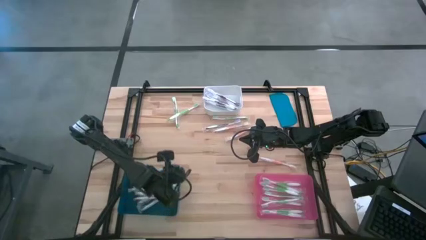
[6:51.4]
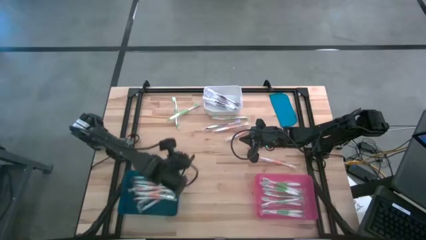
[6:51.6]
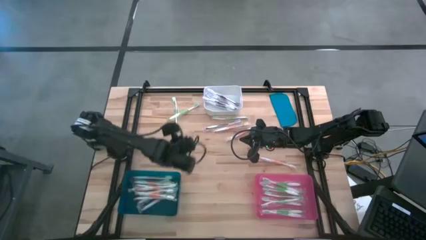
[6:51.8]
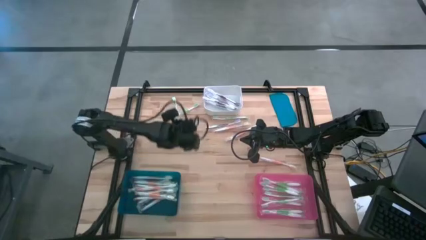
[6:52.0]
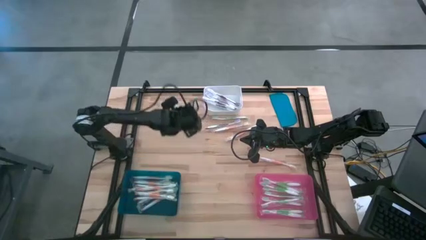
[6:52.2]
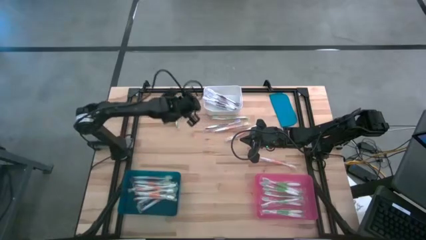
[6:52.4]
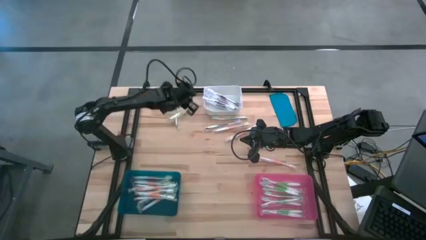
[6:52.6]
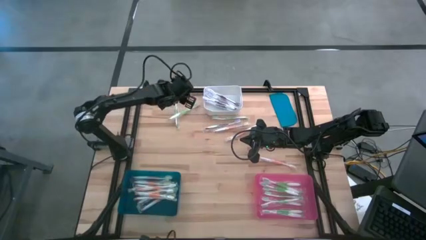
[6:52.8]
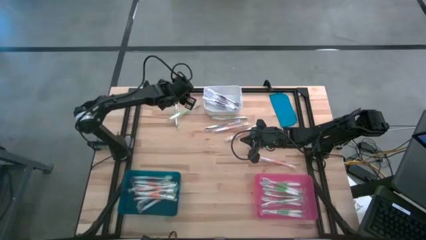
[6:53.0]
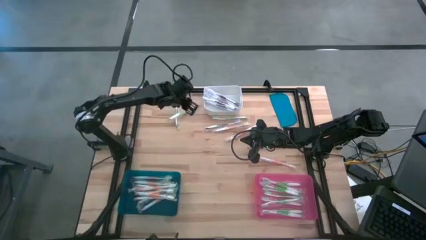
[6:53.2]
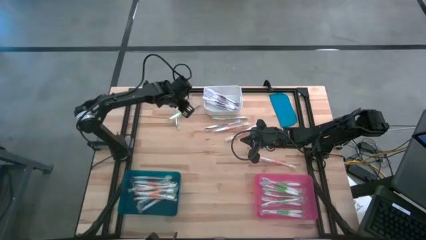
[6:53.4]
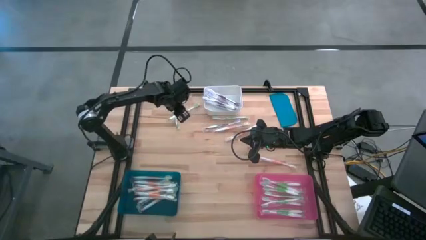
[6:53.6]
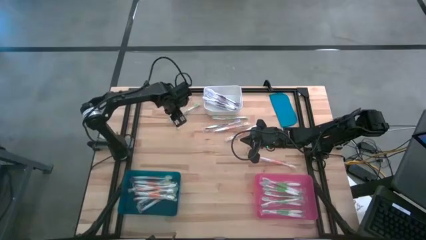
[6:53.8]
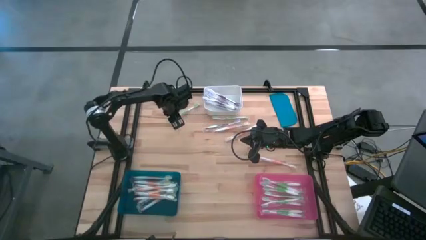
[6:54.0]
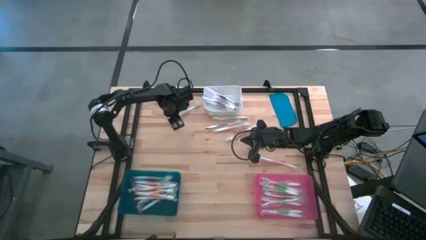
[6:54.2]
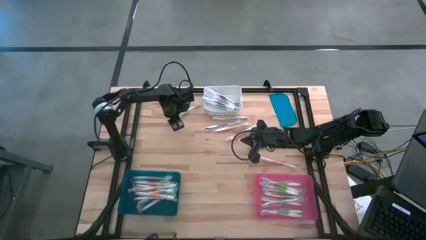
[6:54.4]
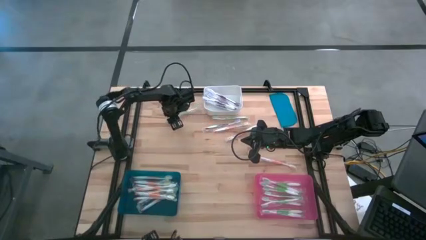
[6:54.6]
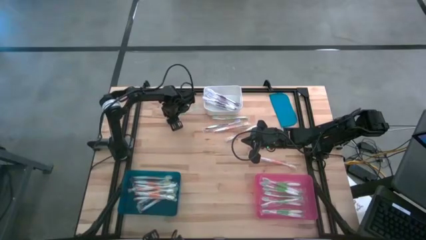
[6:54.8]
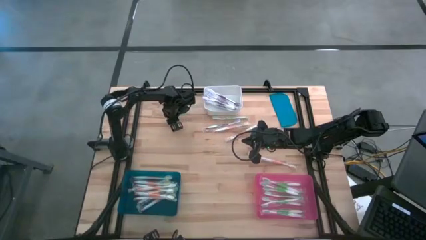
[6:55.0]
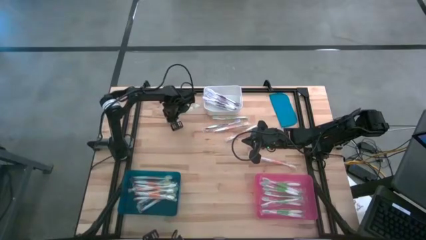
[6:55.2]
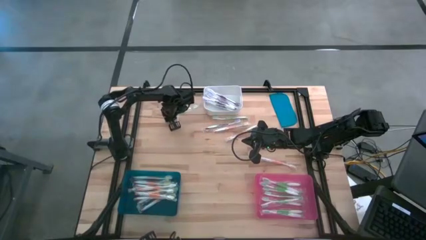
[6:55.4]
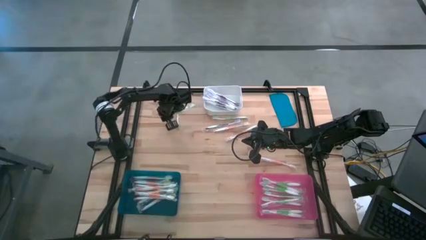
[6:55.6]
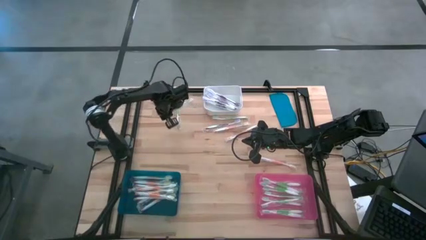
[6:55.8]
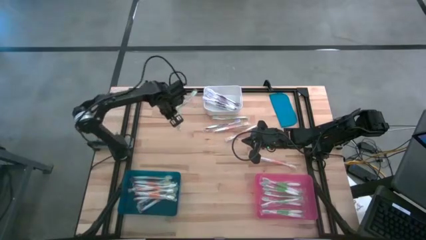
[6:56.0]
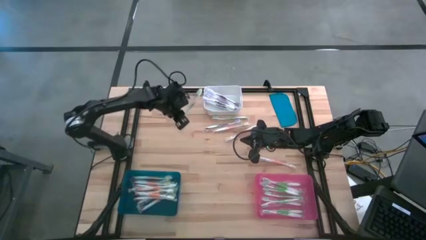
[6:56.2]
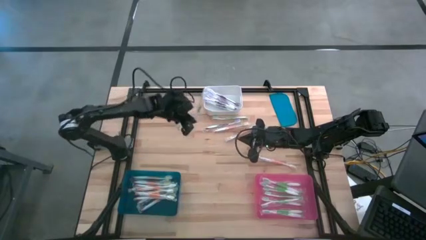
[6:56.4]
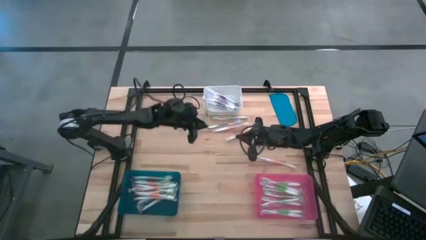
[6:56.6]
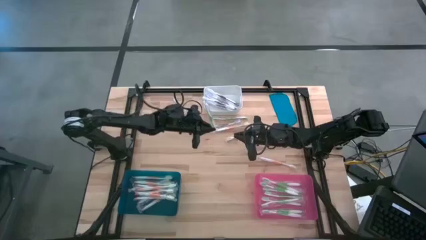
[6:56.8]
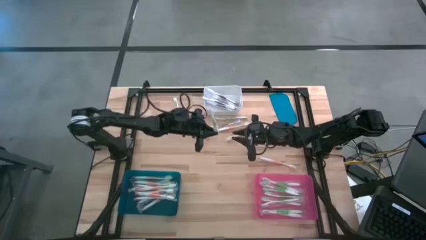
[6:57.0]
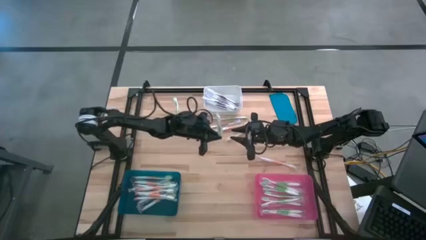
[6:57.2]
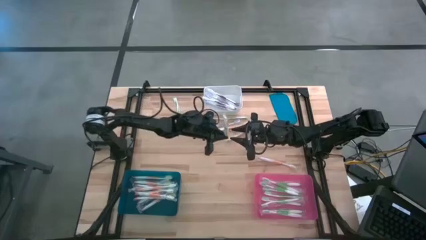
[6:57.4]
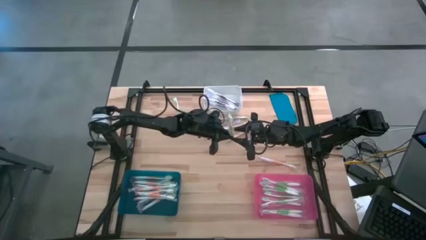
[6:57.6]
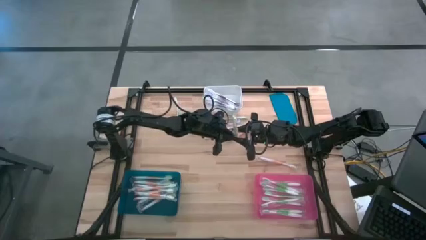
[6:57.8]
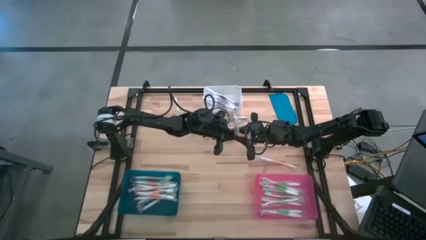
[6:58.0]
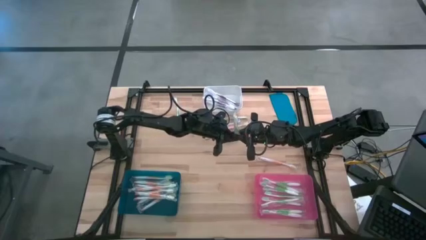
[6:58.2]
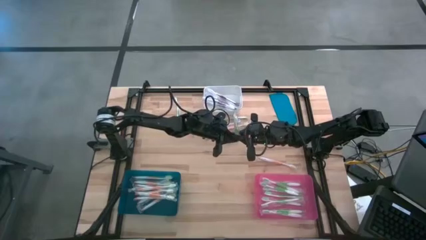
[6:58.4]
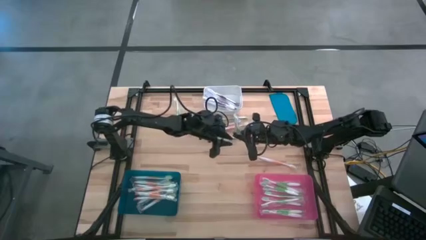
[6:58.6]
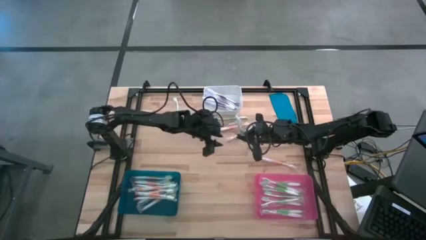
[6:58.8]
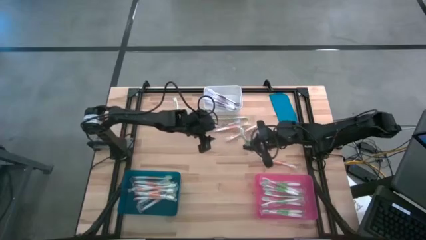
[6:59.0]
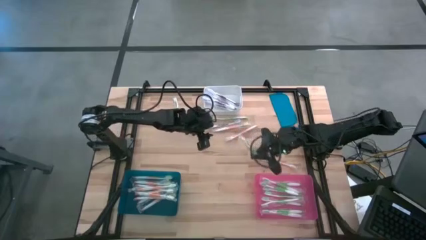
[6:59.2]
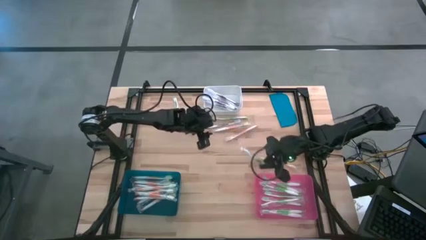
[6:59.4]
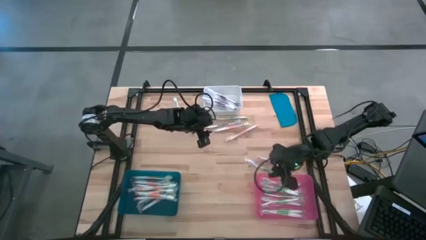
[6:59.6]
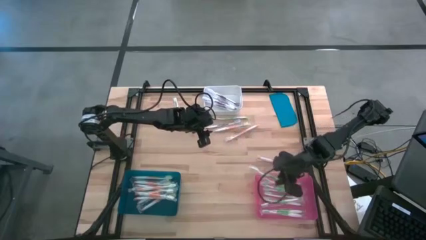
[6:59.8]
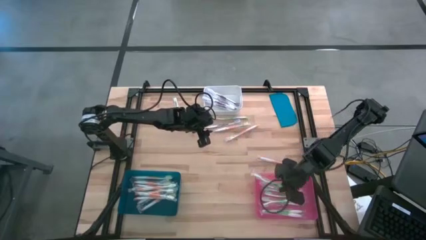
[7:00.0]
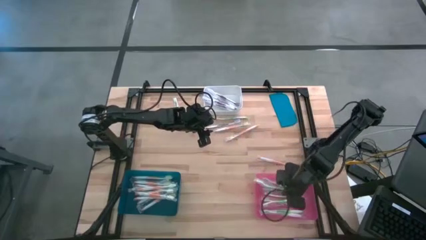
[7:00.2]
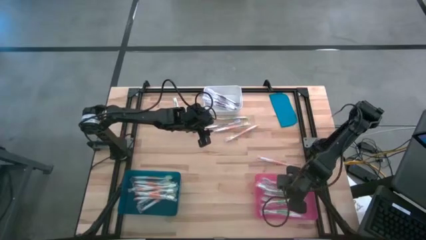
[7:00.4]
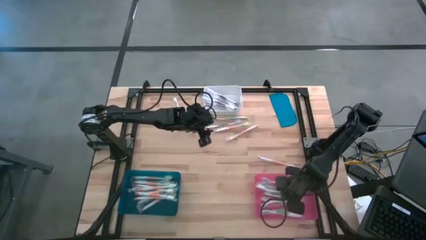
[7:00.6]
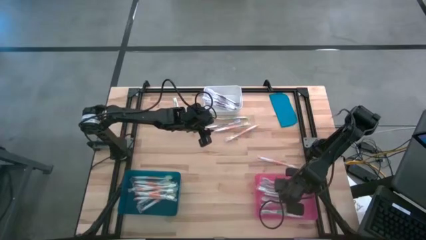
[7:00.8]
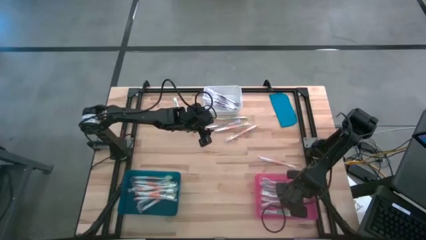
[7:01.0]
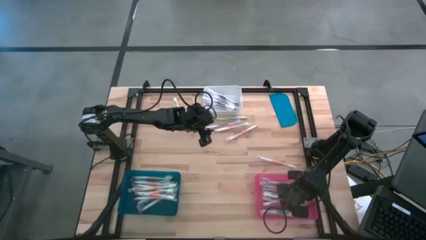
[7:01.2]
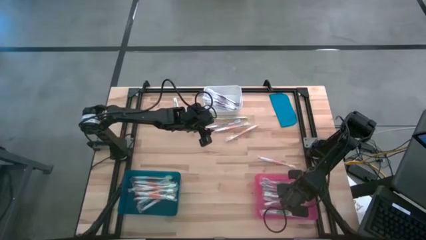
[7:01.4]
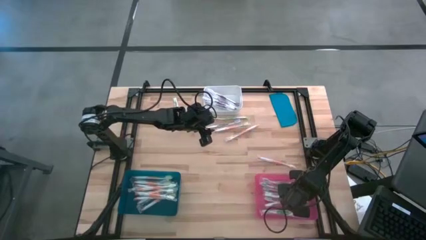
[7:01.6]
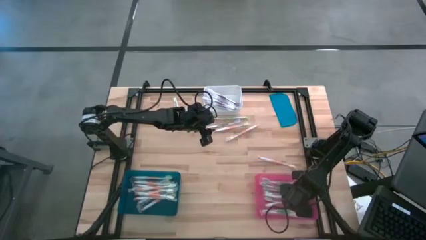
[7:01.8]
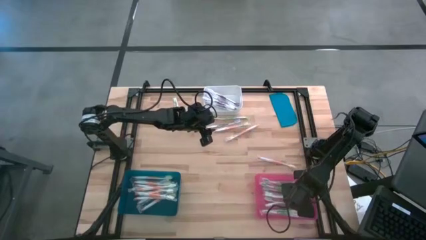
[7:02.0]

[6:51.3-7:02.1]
Task: Pick & Place Toothbrushes
Put the green toothbrush into the pink bin
